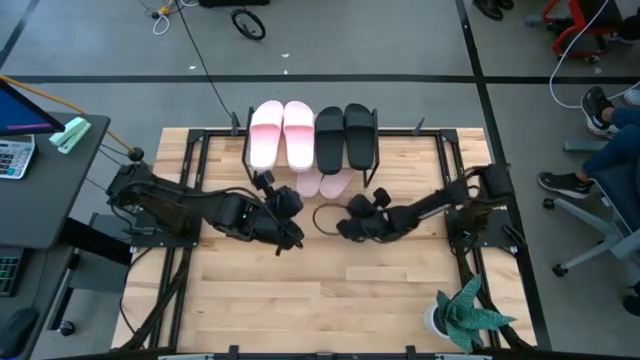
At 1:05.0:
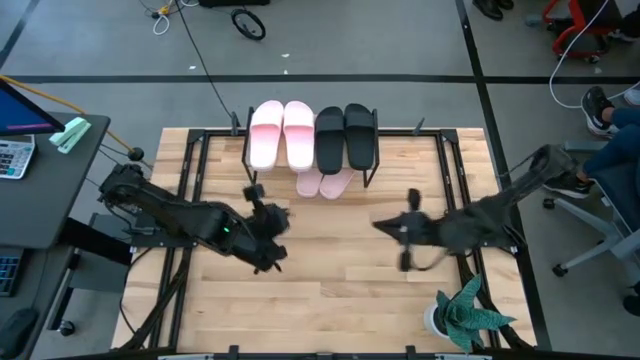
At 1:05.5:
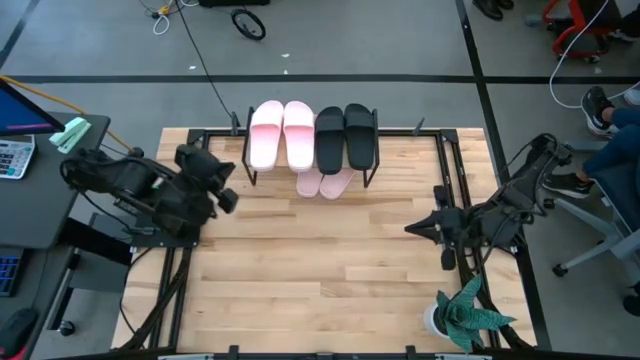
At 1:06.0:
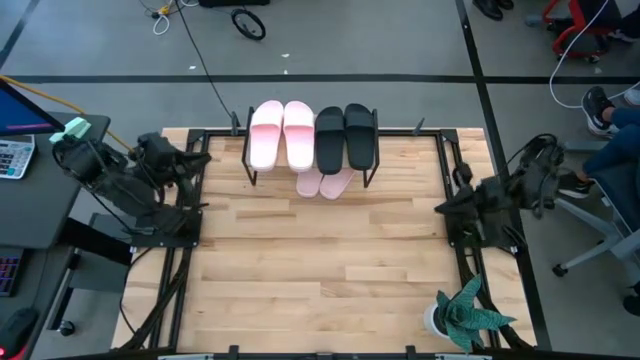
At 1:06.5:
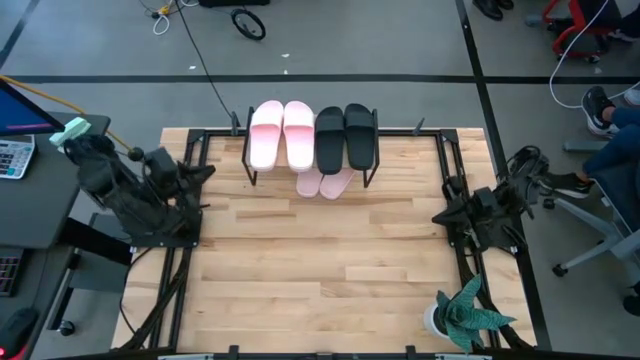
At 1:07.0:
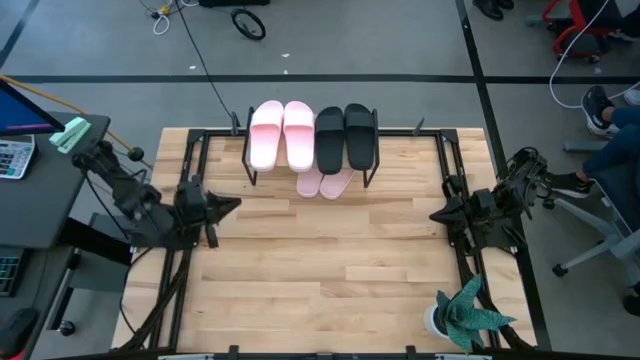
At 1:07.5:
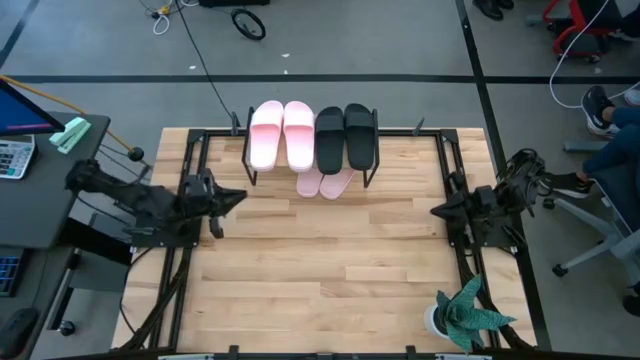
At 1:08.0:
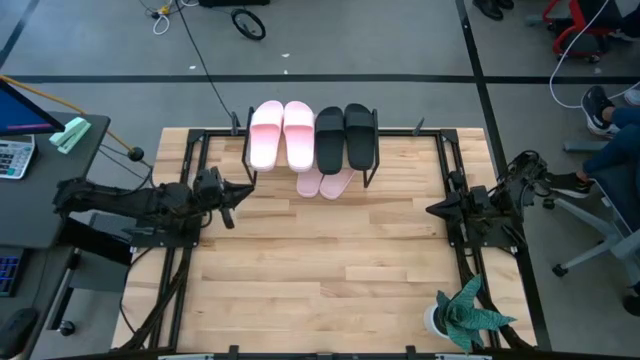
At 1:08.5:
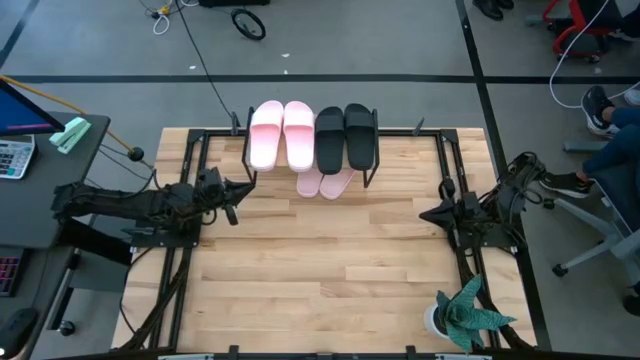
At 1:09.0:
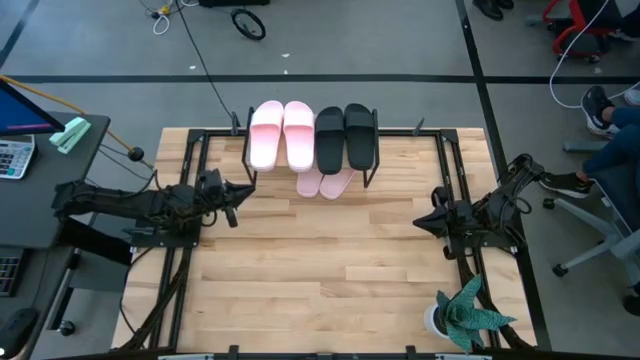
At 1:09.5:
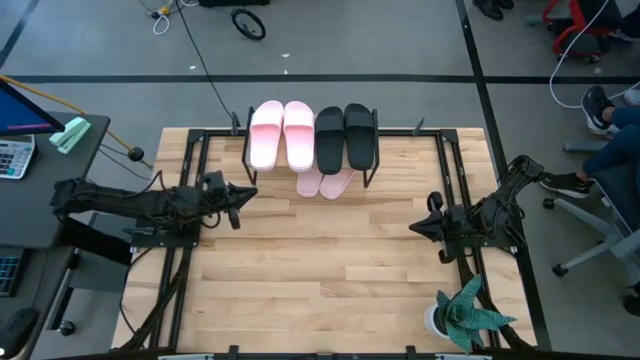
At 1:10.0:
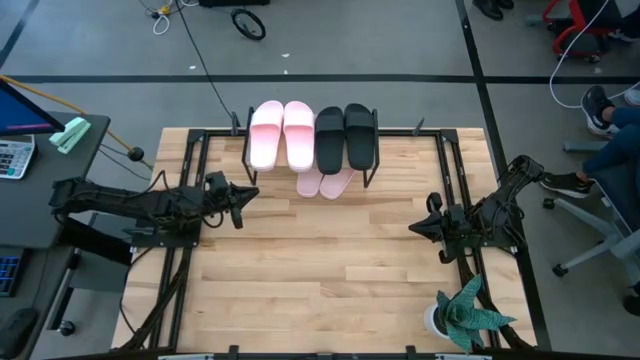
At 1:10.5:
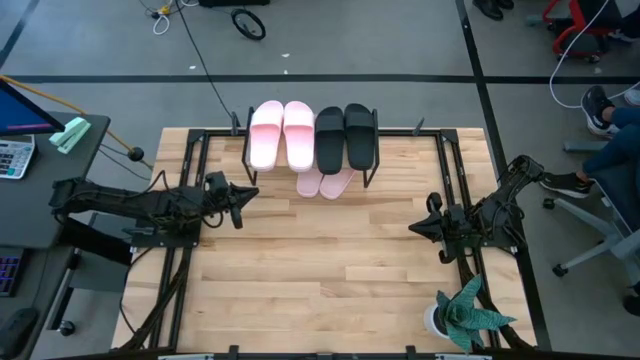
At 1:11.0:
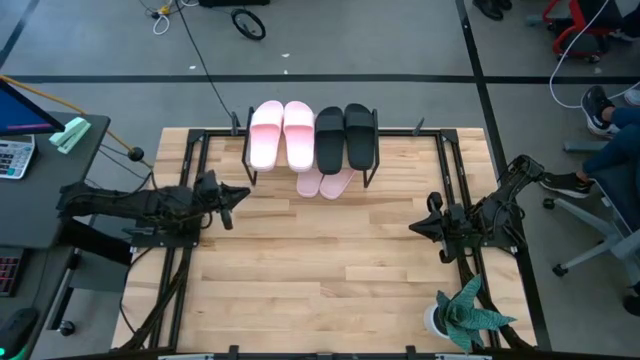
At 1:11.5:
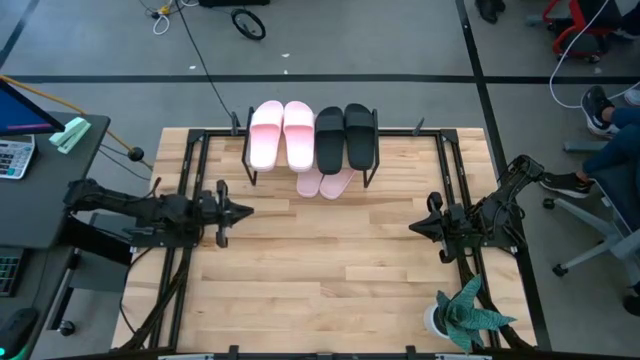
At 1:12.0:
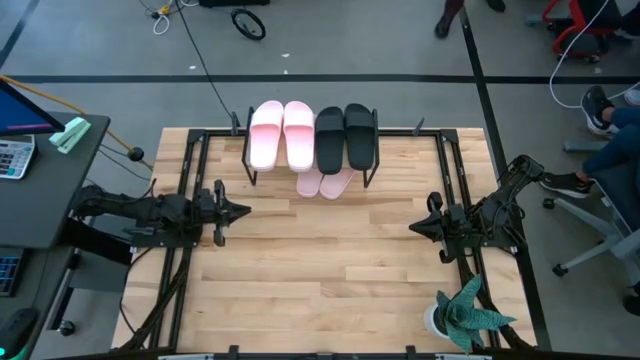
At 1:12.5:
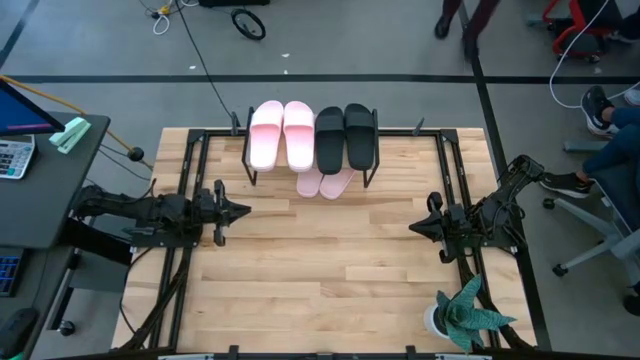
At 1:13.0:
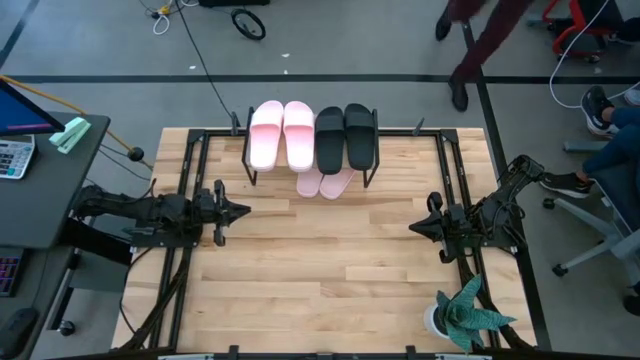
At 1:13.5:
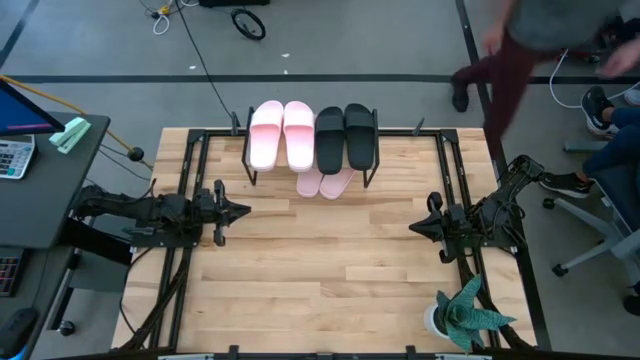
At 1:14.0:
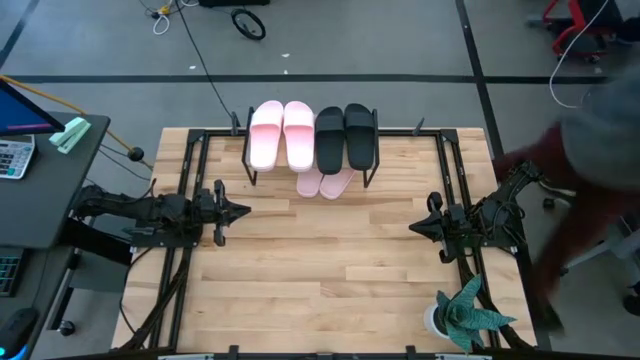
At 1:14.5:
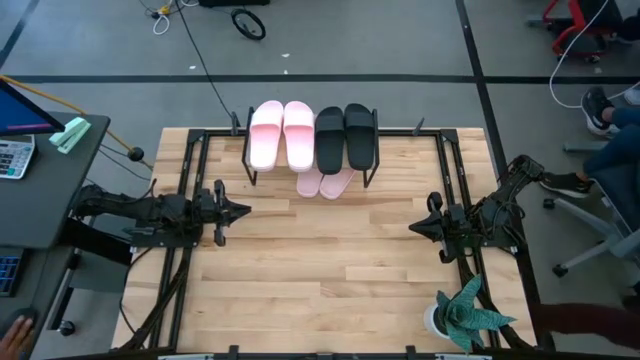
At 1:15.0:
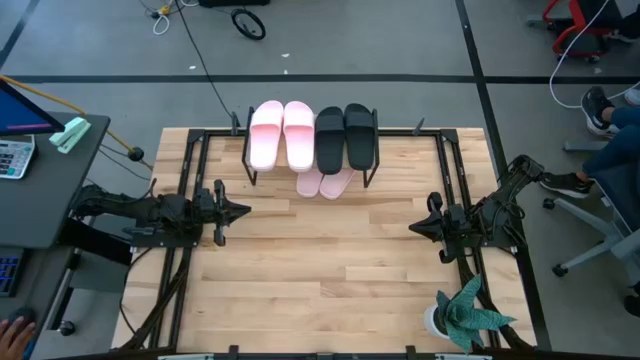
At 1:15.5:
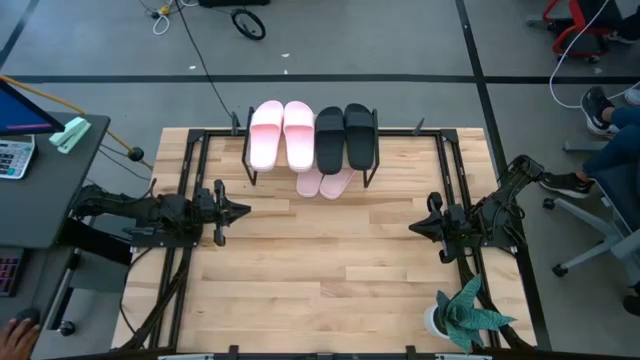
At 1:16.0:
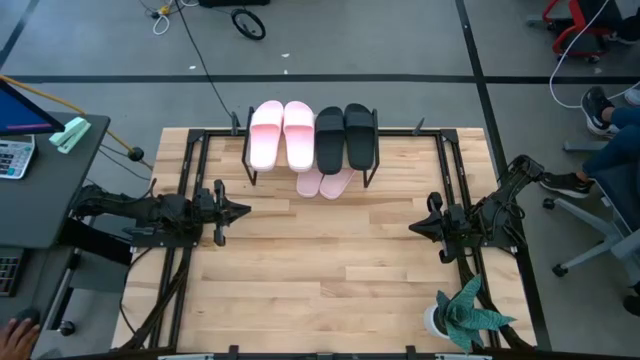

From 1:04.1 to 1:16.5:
Task: Pick and place slides into the shelf
Return to Home Position

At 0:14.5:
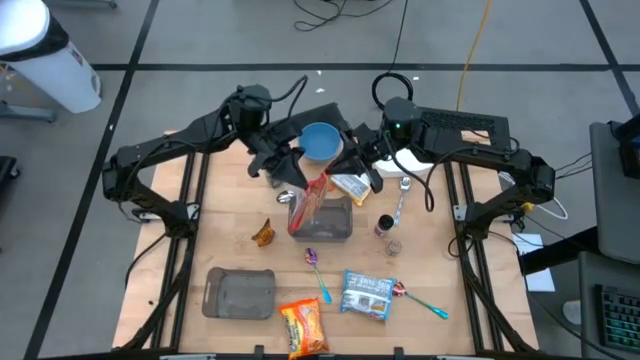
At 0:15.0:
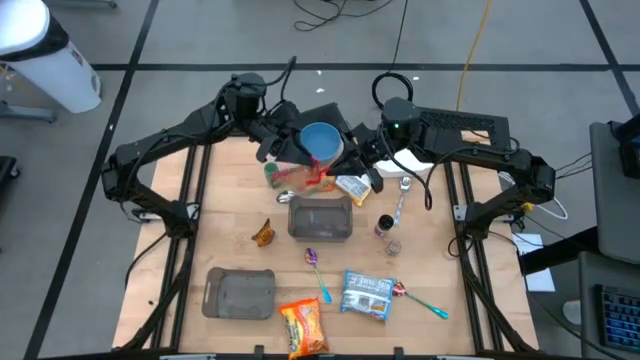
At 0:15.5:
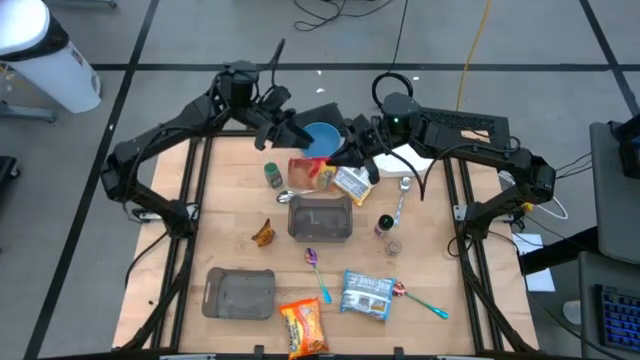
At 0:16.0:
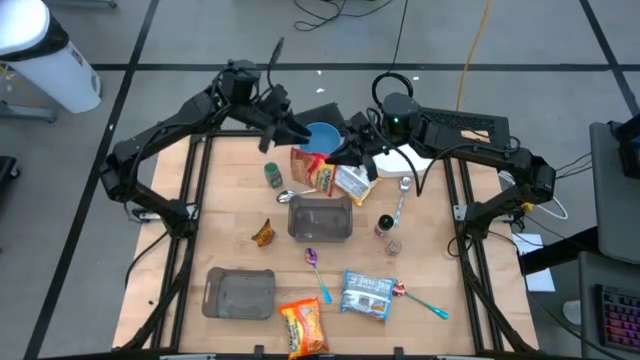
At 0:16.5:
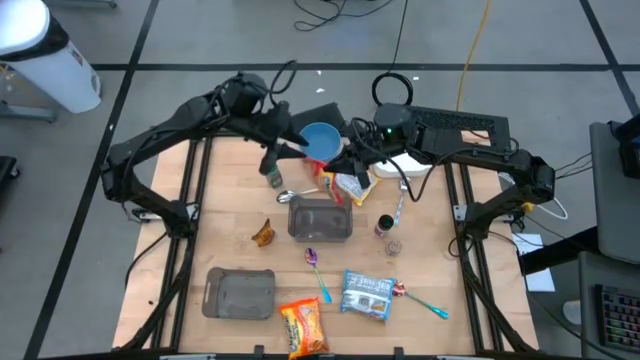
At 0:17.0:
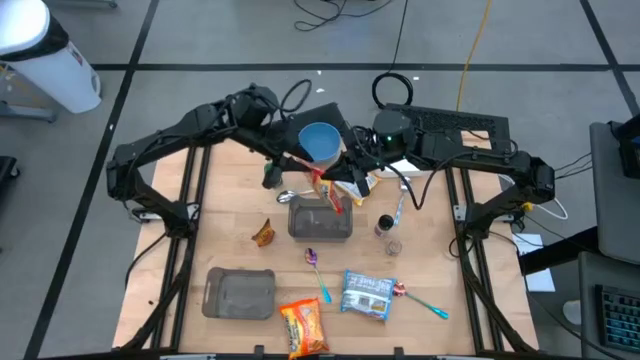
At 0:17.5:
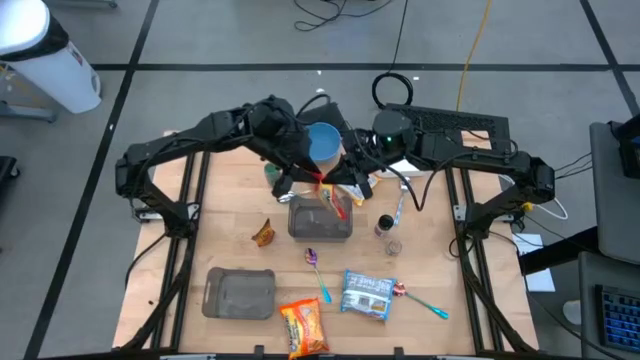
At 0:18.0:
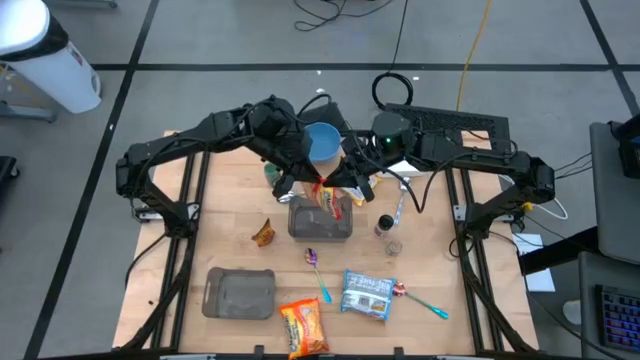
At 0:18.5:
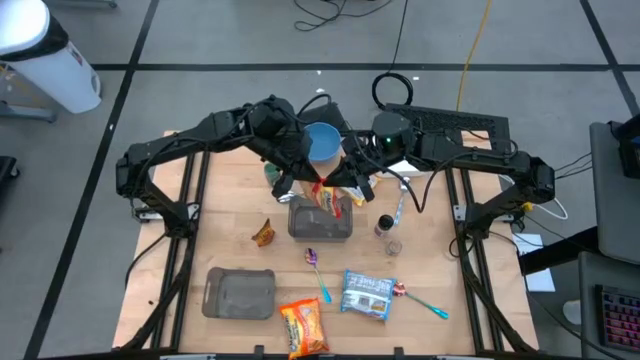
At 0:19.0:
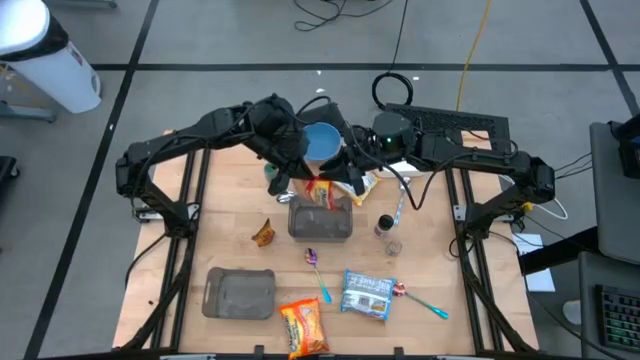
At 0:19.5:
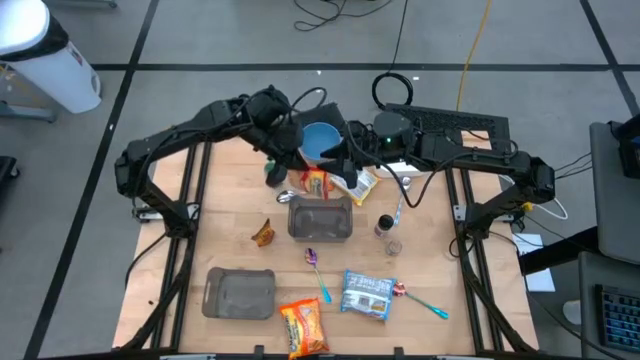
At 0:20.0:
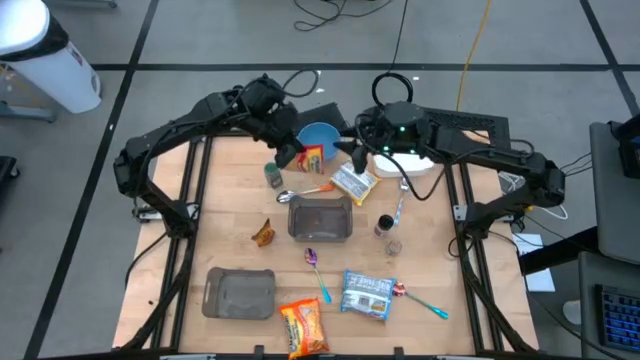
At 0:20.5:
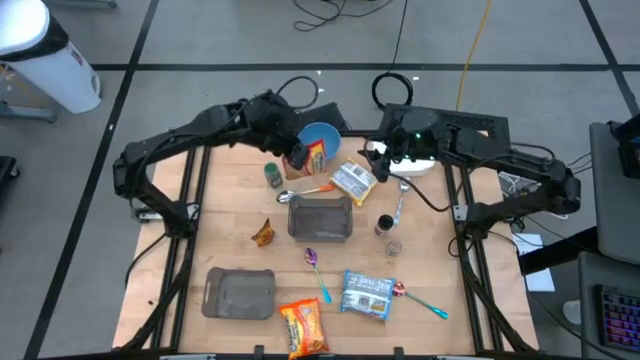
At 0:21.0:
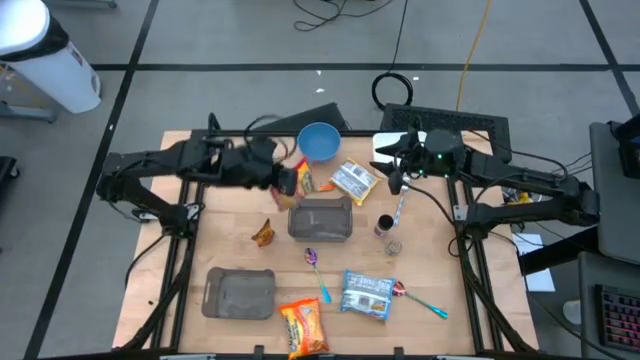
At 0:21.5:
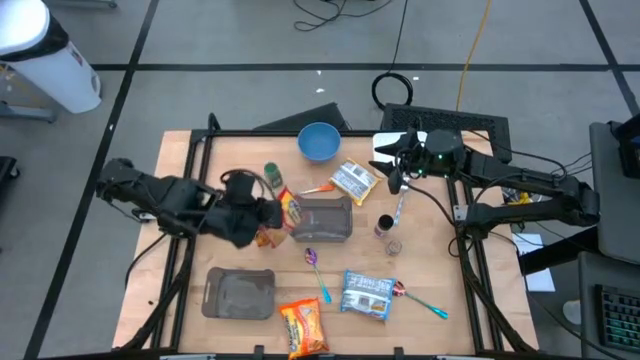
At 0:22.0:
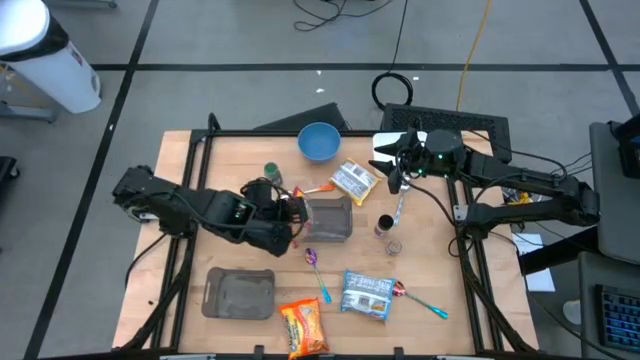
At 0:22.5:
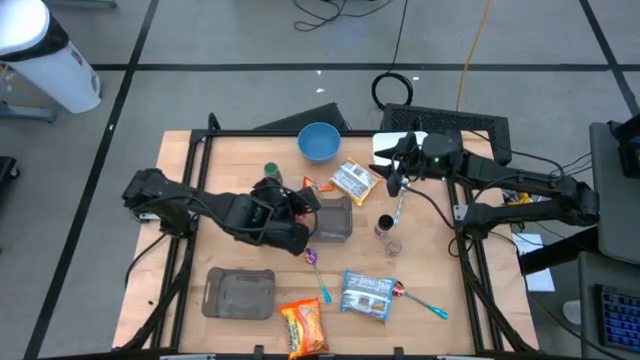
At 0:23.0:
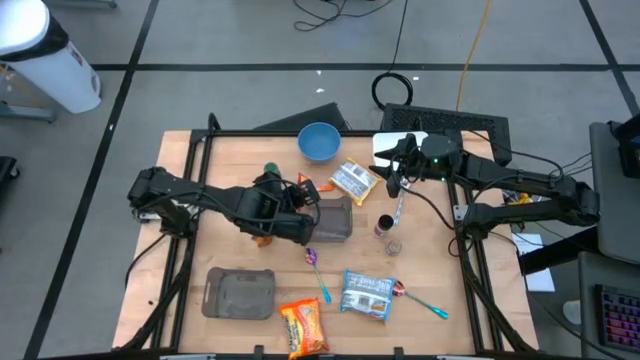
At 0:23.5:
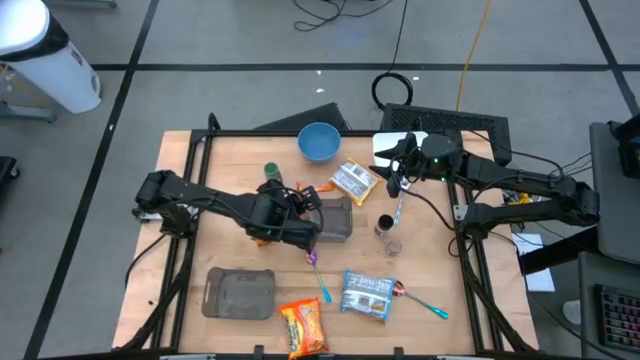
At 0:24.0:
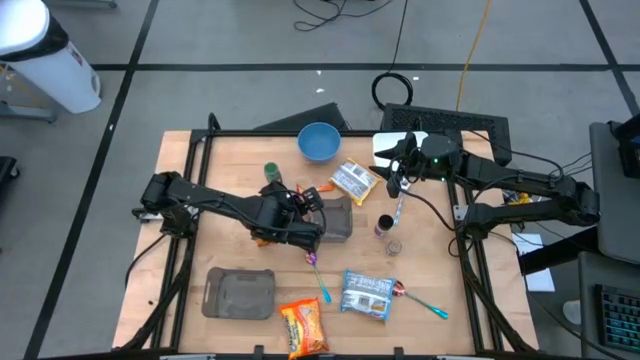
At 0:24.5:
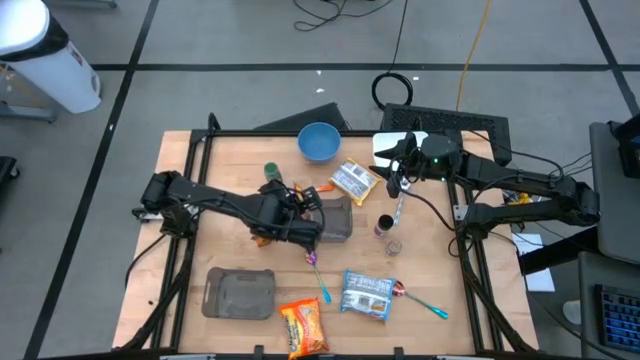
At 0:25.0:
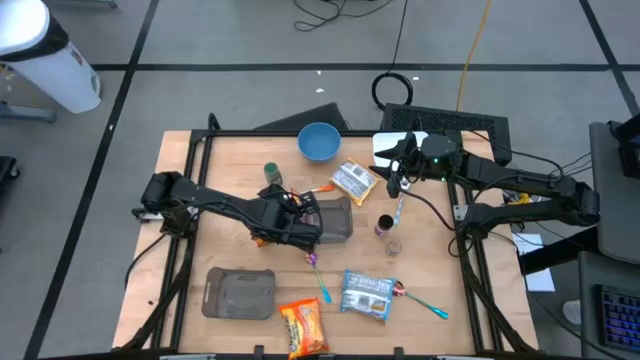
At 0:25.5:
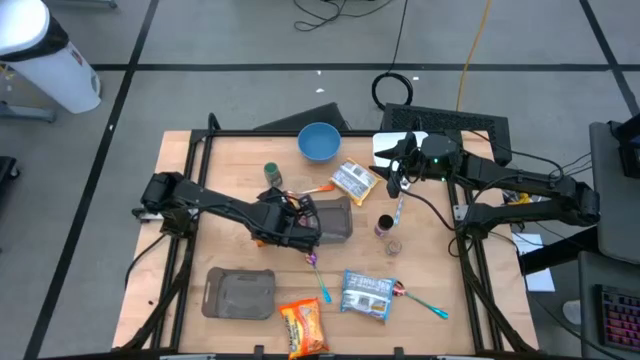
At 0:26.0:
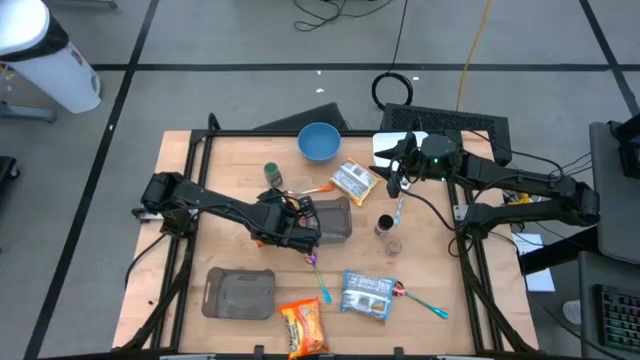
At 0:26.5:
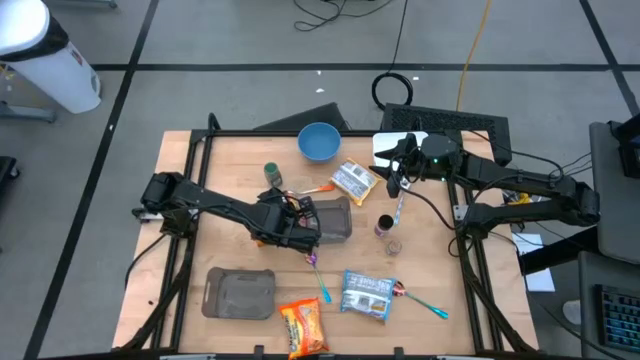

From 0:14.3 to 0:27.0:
Task: Pick & Place Food Item
Put the red noodle pack into the top black bin
